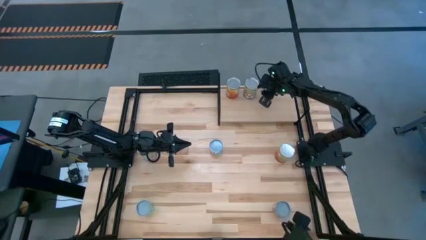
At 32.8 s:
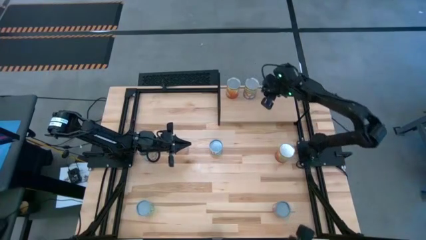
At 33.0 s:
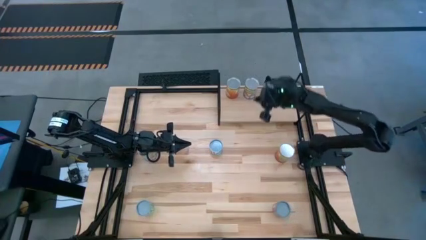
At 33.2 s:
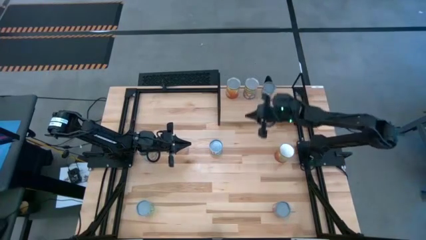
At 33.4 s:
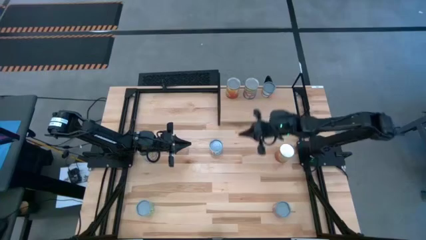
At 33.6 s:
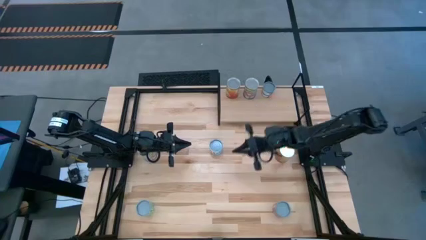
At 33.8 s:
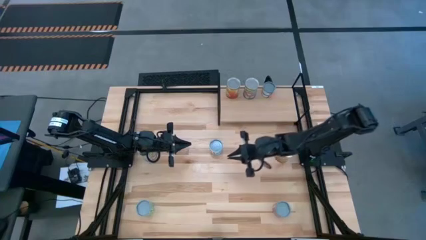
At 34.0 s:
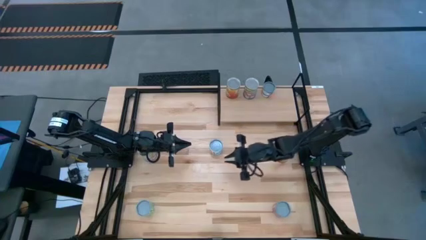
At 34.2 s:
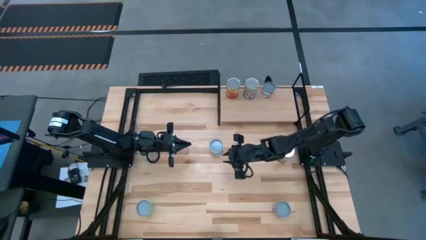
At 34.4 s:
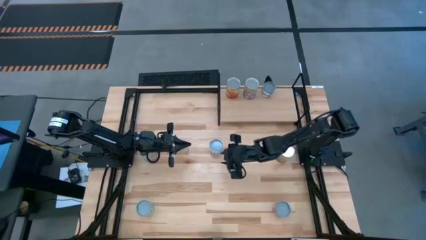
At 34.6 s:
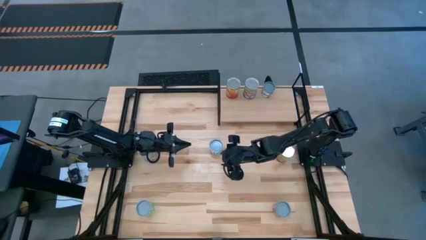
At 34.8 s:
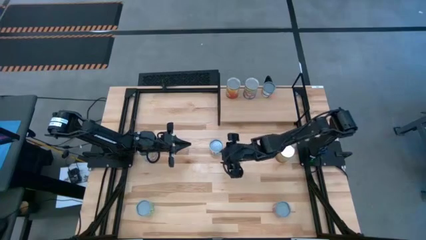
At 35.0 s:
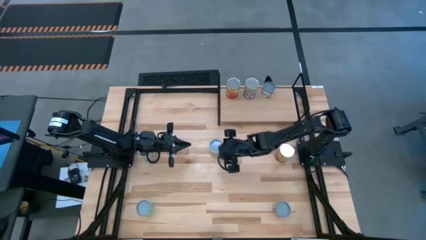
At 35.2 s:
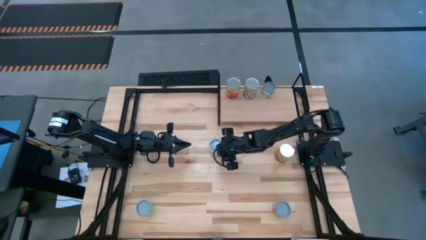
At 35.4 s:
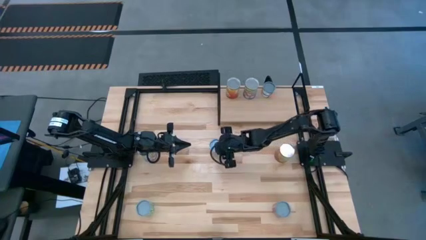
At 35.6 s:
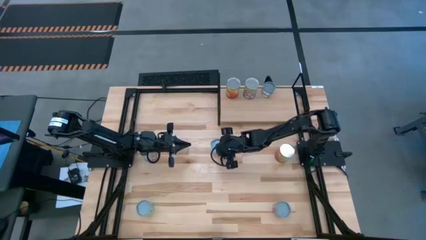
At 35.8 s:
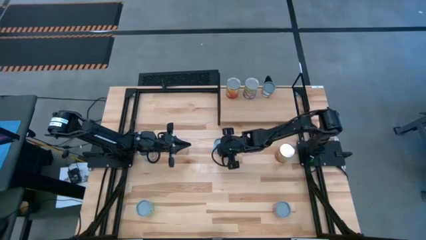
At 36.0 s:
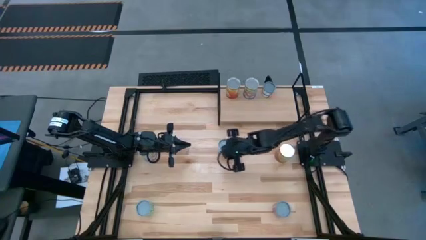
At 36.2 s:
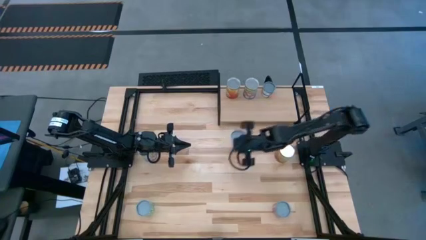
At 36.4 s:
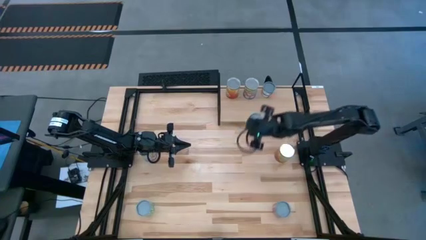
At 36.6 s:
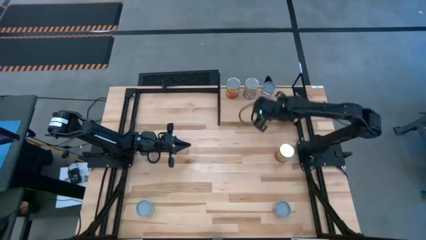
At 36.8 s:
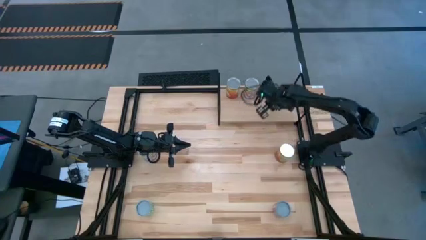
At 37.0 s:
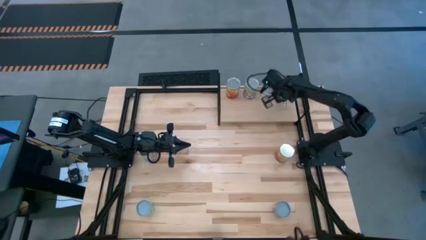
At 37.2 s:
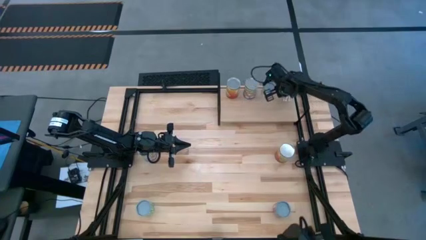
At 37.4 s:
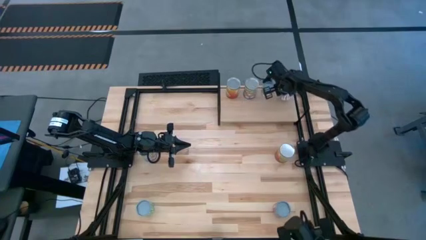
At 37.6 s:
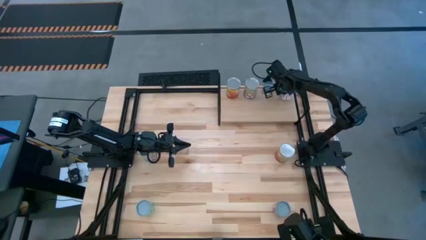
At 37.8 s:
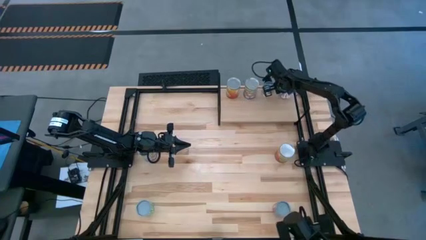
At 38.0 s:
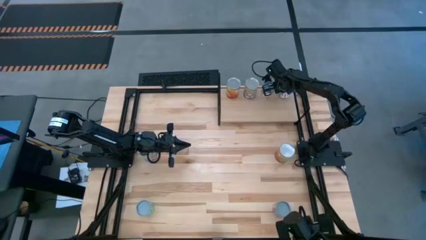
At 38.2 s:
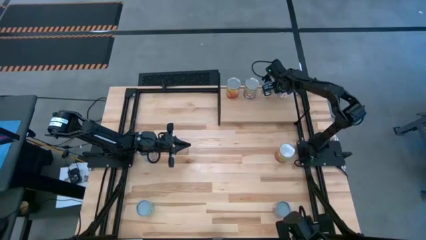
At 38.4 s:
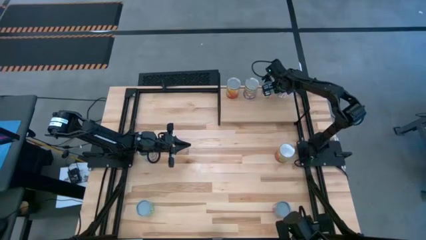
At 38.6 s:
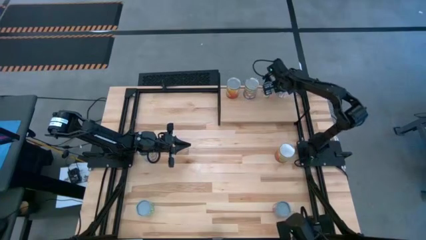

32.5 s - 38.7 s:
Task: Pick and place cans onto a shelf
Put the green can on the shelf

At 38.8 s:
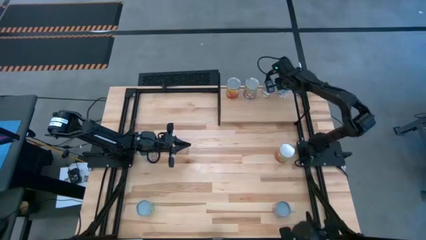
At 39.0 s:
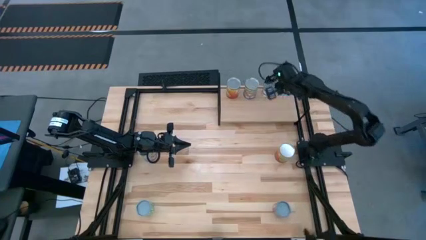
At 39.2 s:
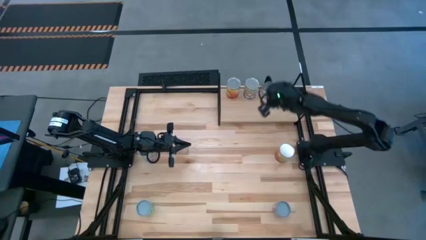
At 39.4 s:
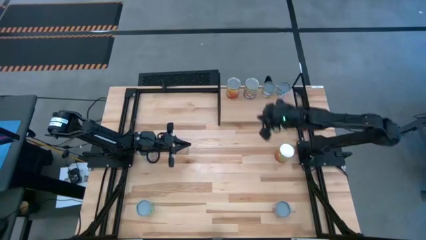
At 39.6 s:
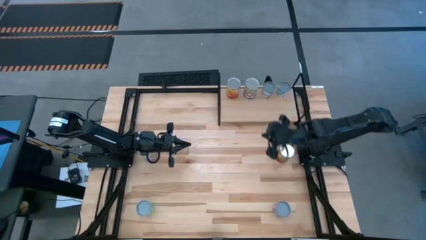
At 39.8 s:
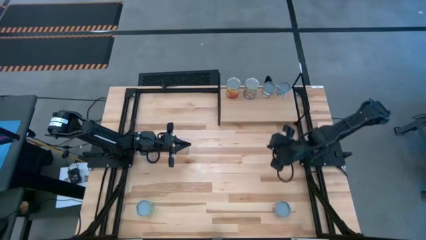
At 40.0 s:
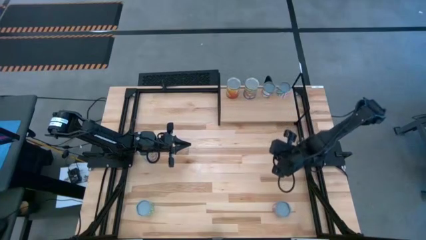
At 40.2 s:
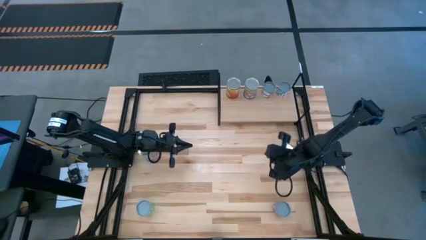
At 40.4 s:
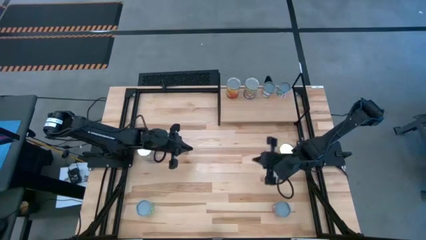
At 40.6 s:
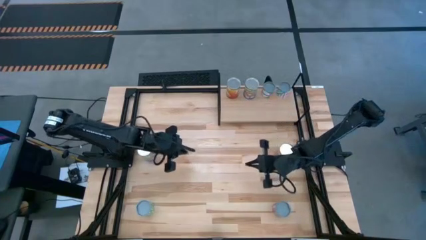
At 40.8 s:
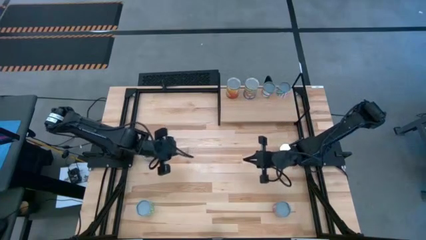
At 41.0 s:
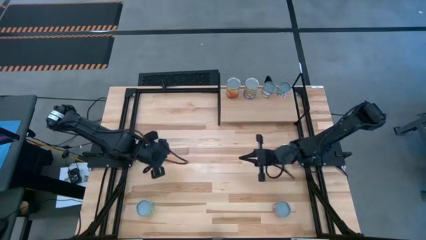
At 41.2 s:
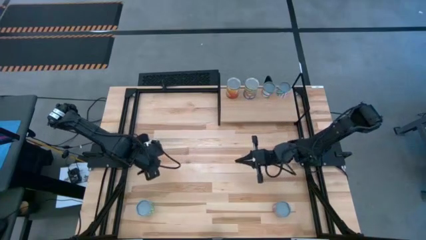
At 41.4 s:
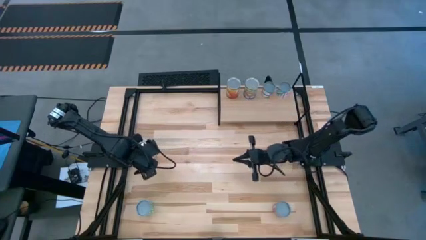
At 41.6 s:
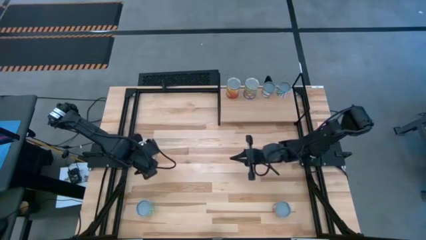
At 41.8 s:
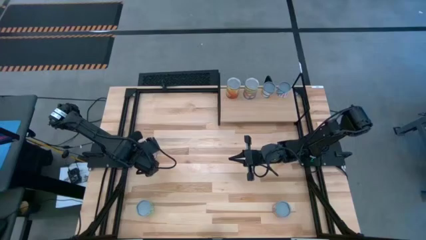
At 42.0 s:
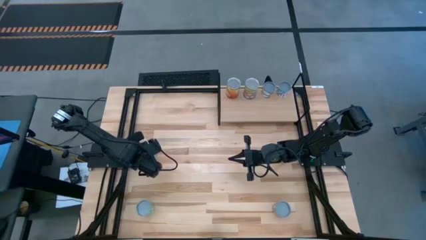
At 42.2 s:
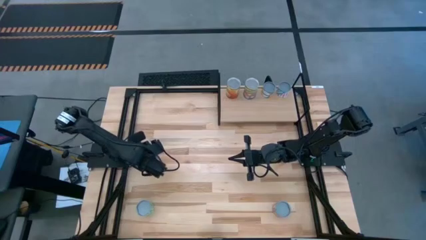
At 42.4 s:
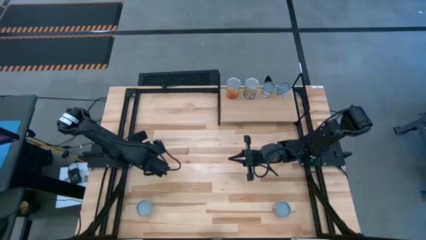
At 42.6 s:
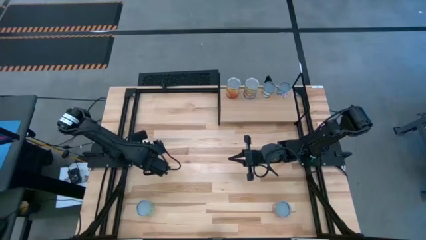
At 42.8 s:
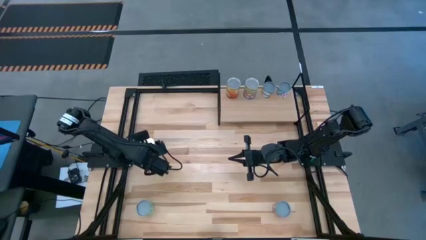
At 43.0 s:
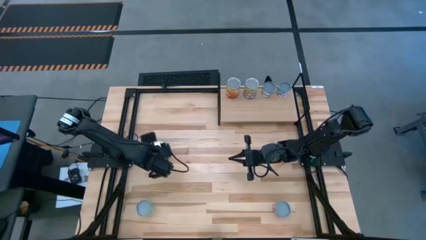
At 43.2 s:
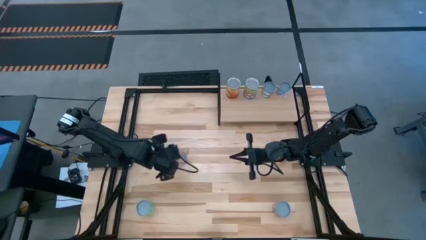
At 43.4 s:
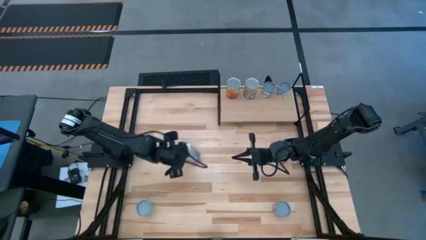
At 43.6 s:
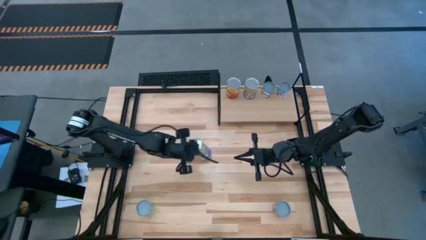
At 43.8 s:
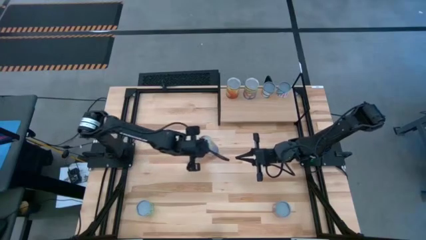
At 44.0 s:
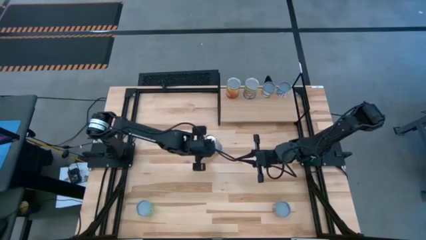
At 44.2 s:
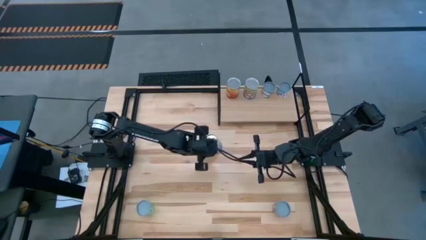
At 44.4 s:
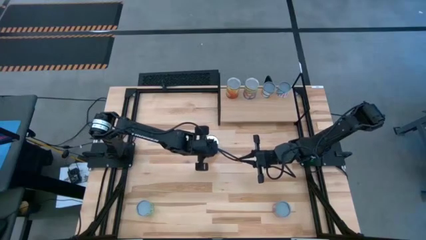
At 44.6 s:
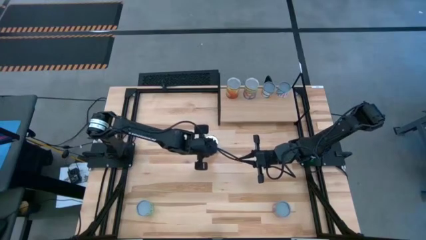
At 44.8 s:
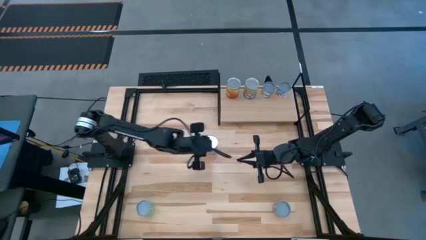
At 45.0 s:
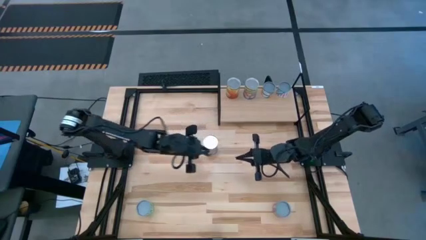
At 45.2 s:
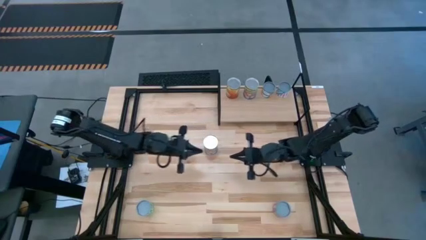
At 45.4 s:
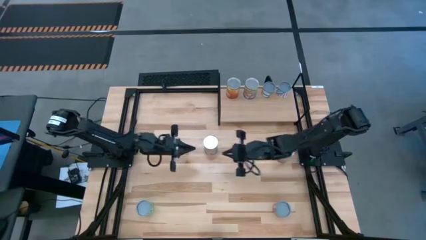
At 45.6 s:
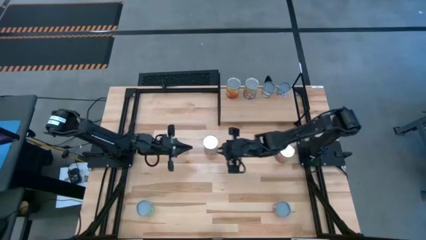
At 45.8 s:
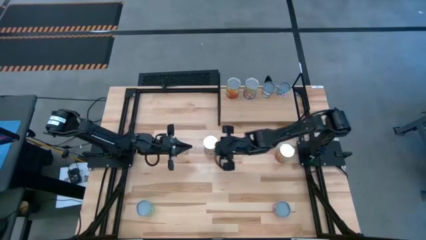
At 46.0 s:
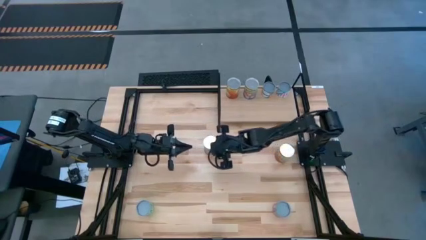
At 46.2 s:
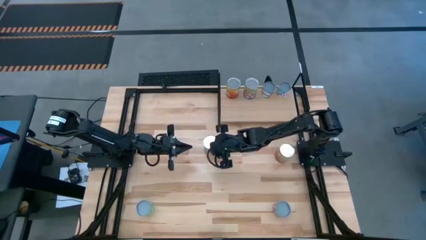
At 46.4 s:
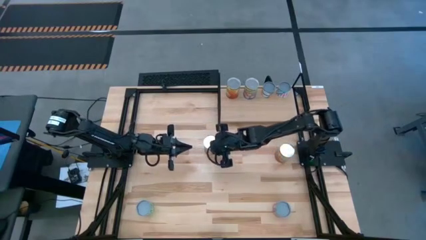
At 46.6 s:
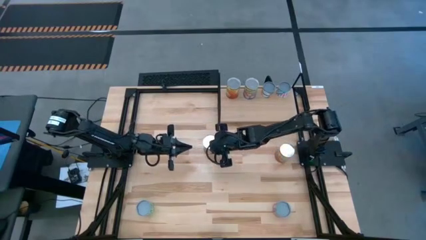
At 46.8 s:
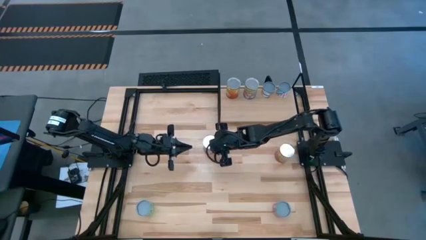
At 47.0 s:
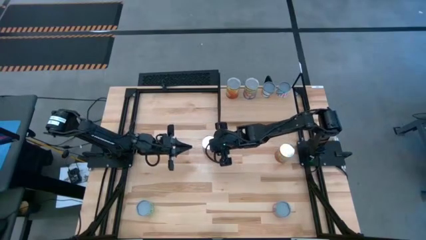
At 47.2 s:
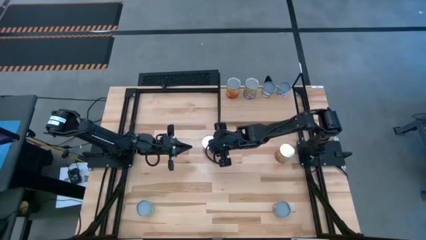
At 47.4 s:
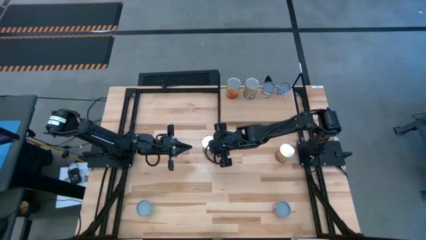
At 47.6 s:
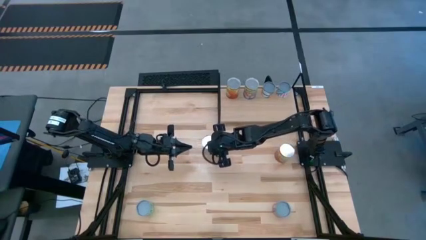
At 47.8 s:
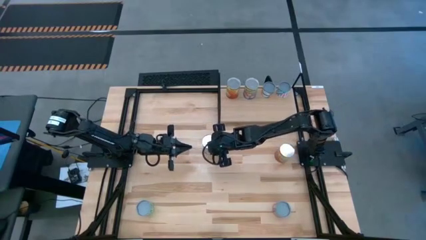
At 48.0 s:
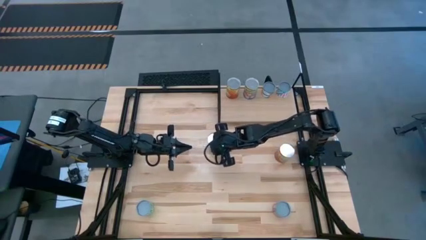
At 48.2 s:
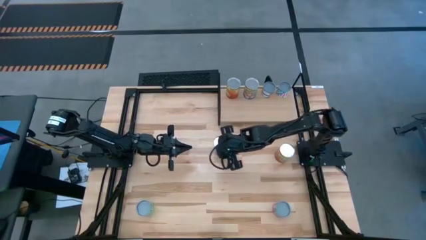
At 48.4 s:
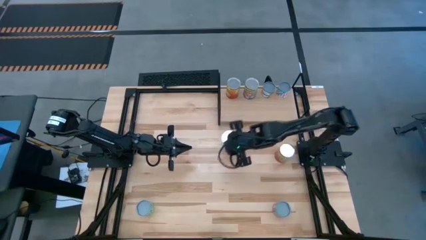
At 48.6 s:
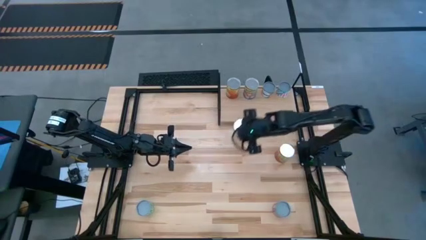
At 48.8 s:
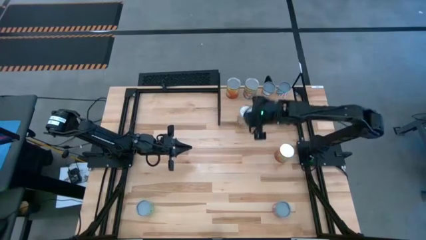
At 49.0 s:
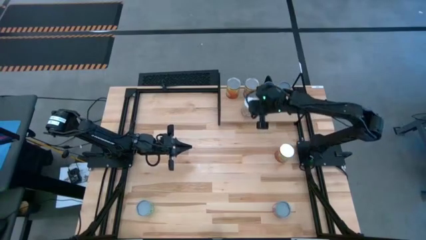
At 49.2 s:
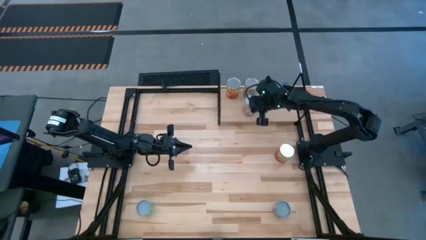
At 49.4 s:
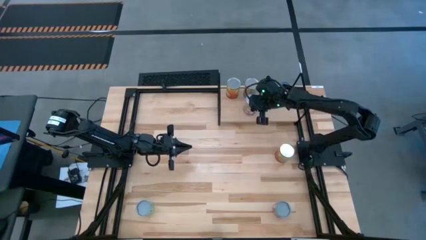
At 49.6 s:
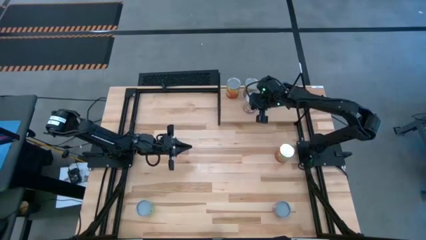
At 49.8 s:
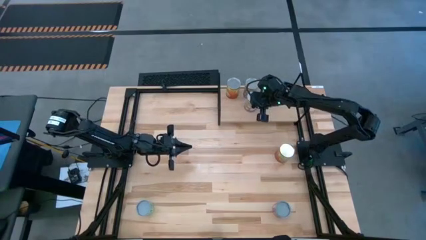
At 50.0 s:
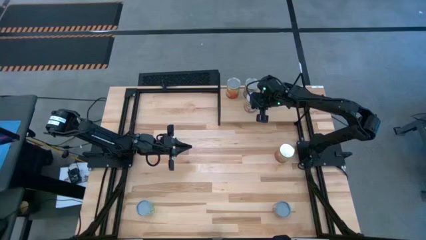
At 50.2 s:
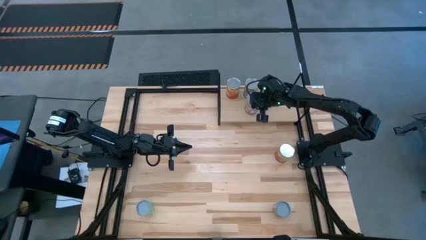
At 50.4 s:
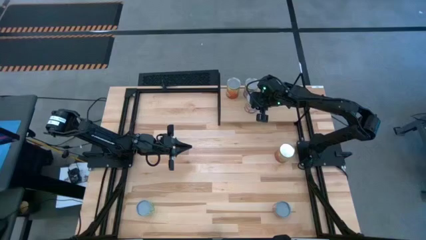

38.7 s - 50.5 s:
Put the blue can on the shelf
